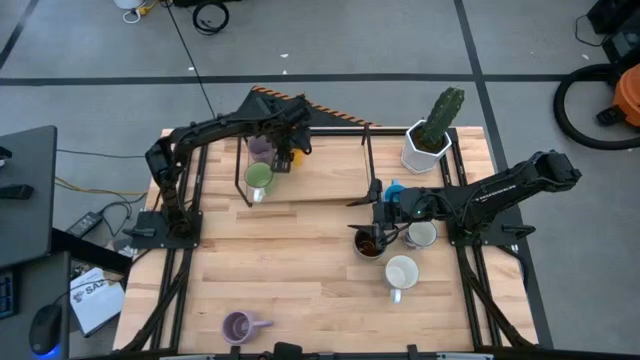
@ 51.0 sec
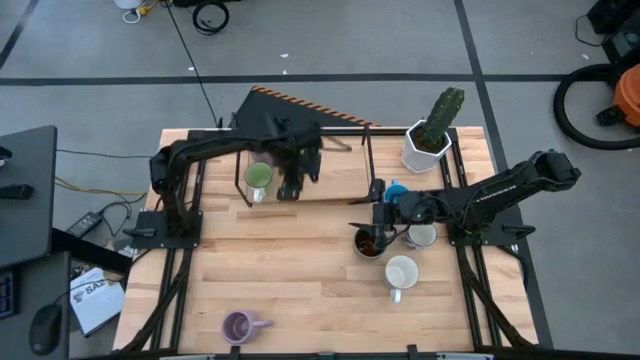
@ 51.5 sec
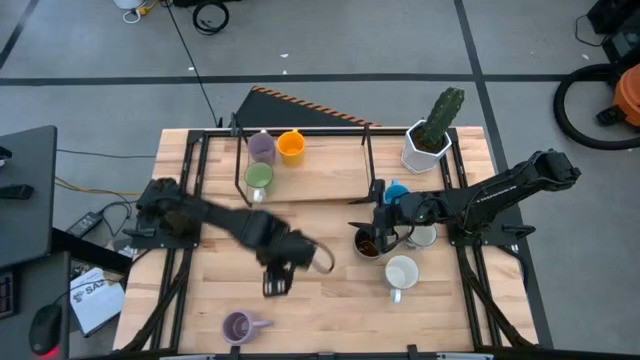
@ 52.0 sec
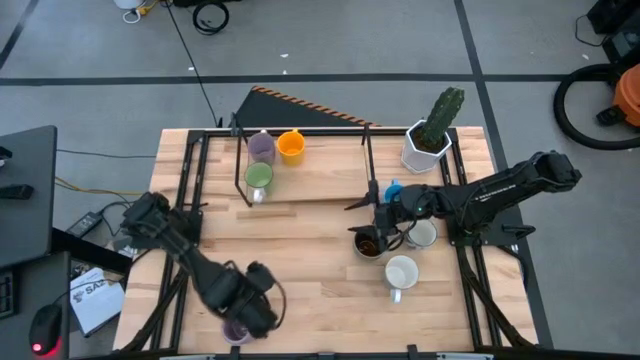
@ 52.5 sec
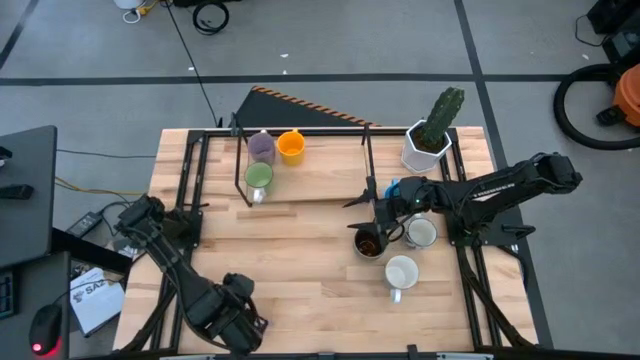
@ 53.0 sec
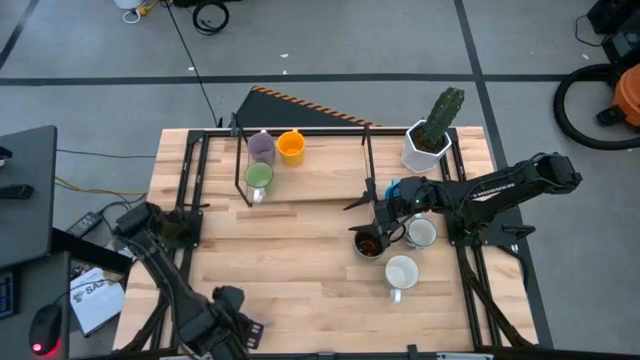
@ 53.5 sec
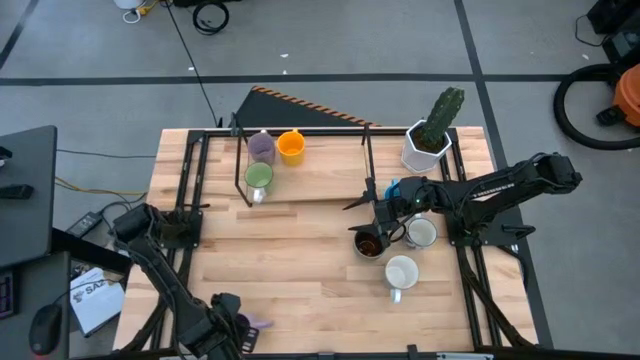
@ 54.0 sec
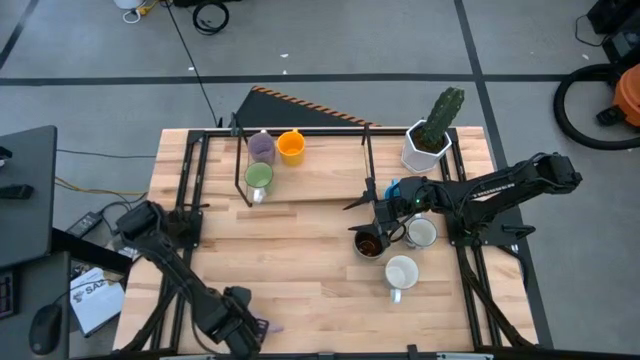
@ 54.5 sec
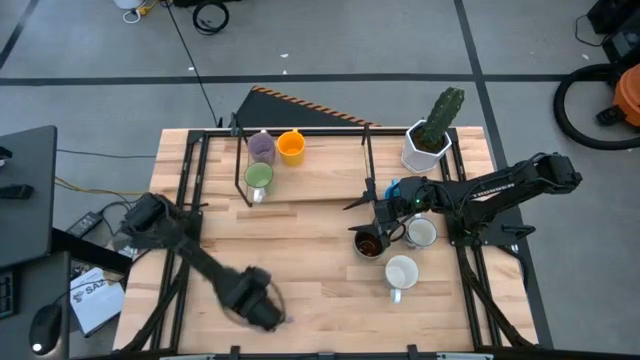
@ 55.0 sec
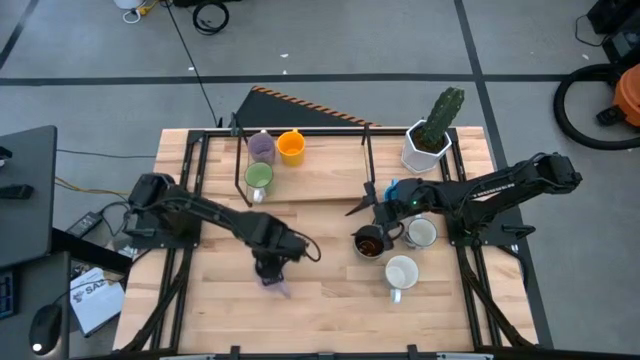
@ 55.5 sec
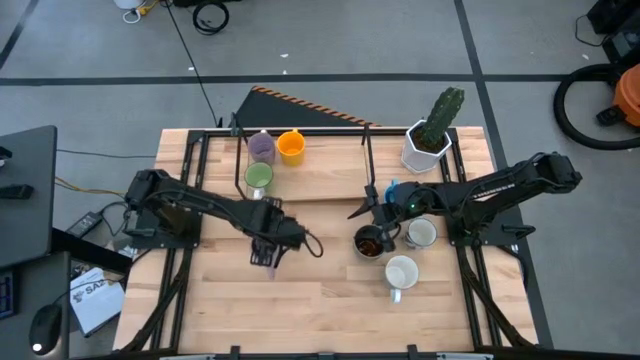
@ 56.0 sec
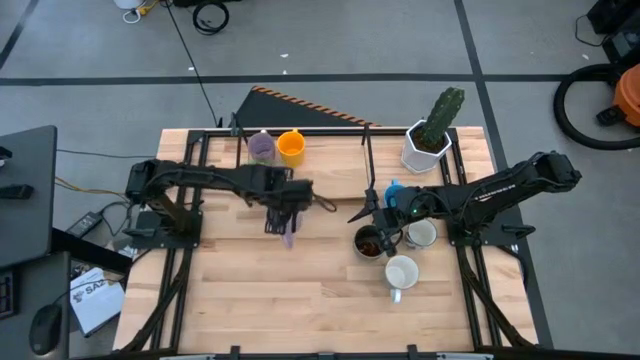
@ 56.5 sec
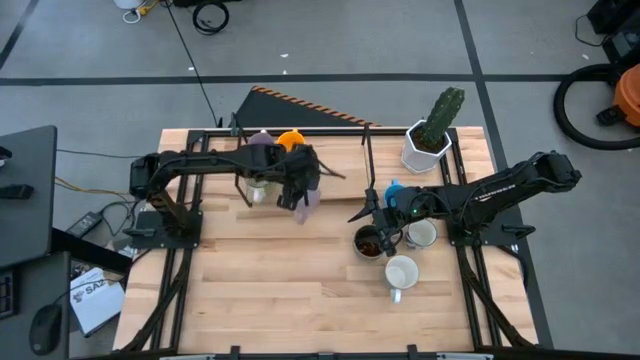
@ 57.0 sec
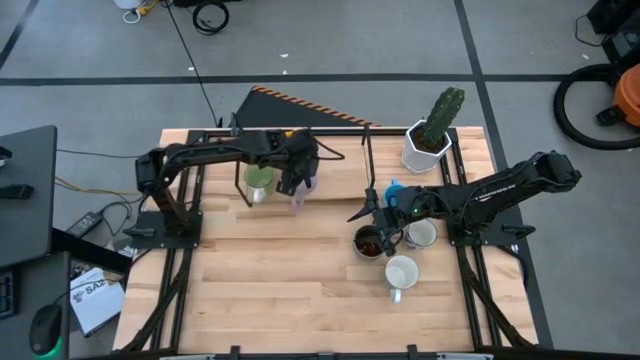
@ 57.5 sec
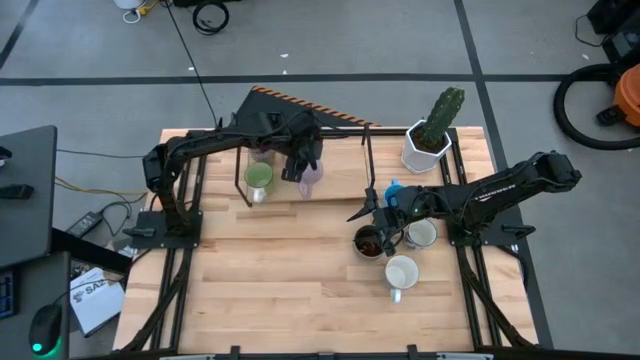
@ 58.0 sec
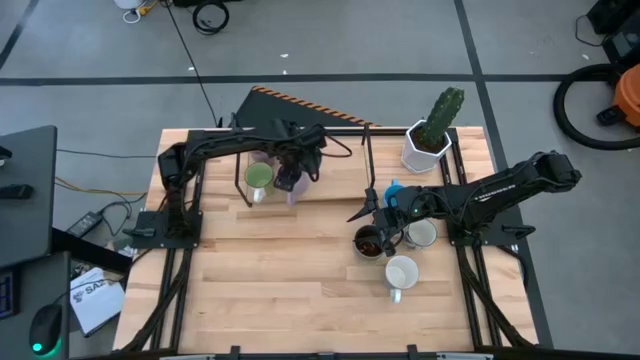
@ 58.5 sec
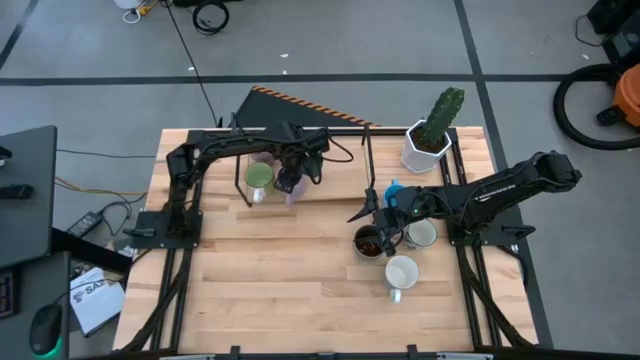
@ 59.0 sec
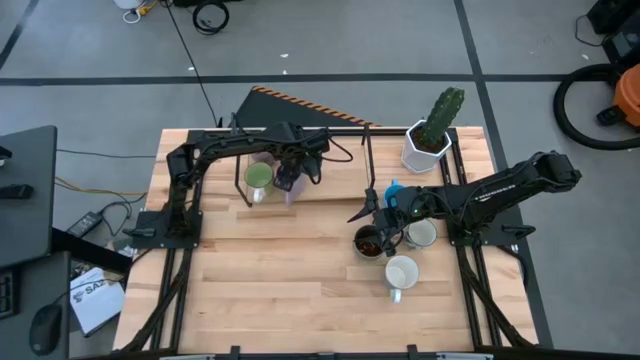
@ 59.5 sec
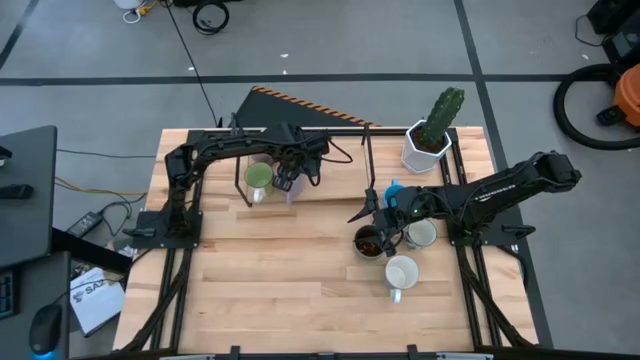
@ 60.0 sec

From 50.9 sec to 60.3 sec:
Task: Place coffee mugs
Put the purple mug on the shelf

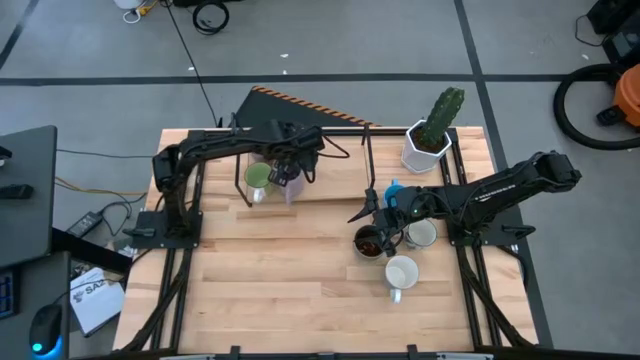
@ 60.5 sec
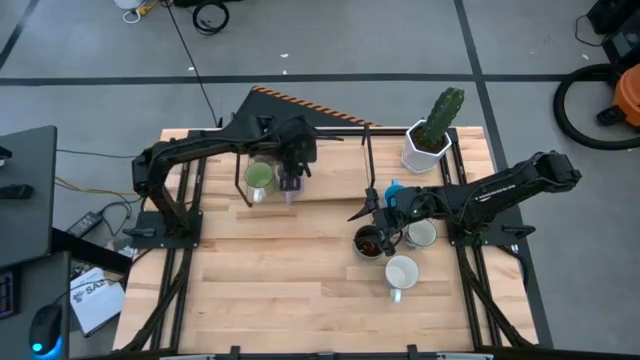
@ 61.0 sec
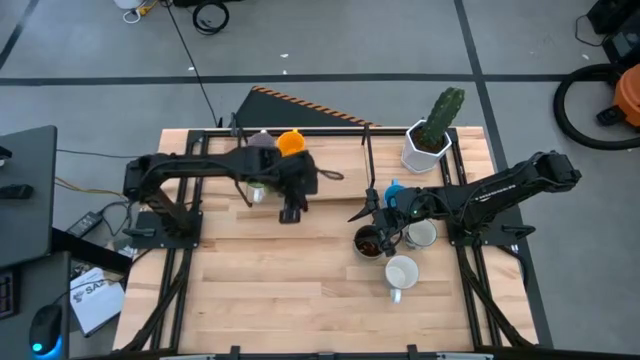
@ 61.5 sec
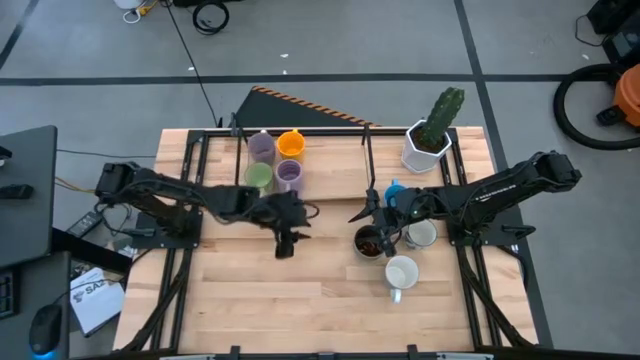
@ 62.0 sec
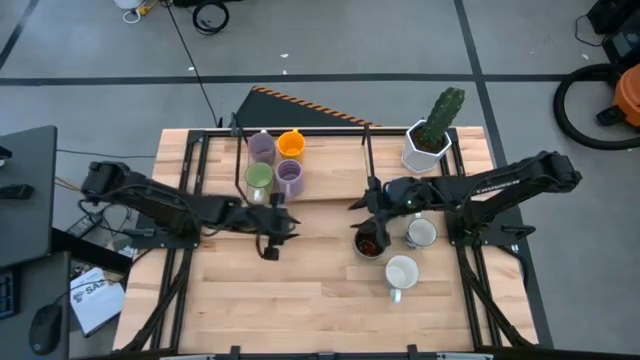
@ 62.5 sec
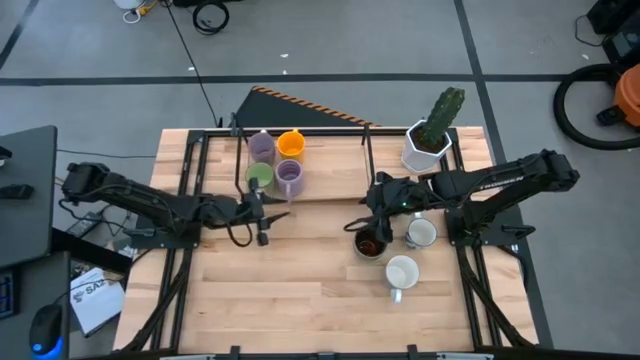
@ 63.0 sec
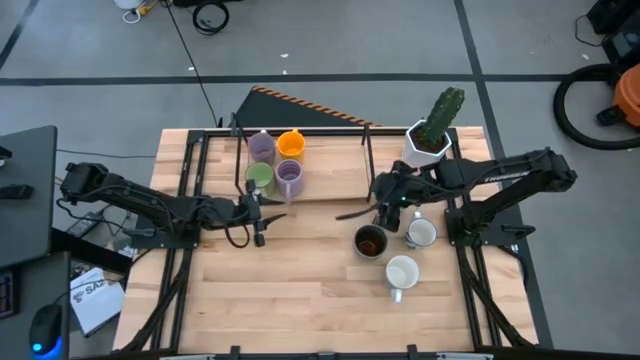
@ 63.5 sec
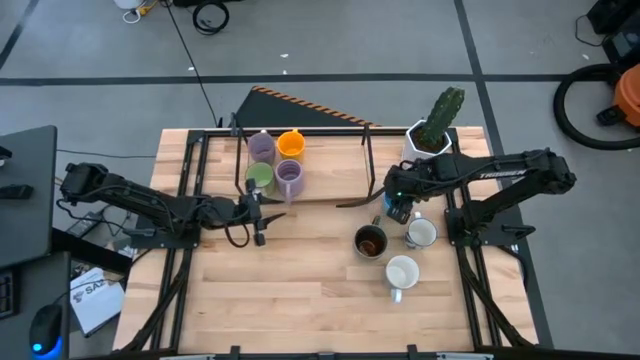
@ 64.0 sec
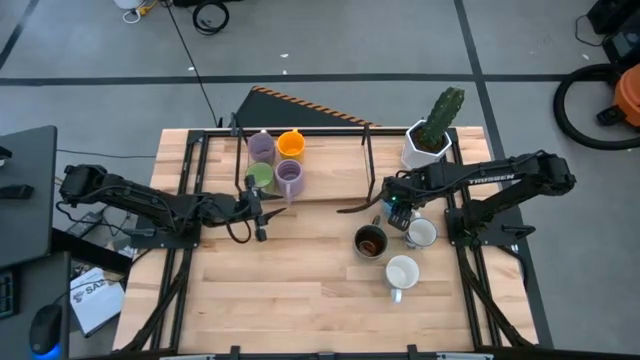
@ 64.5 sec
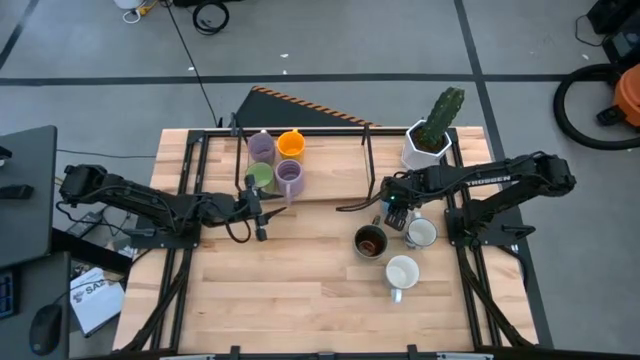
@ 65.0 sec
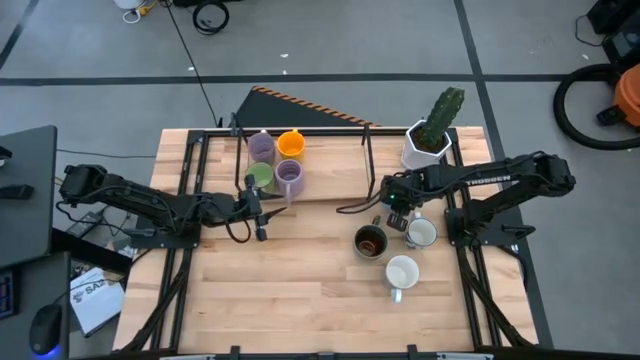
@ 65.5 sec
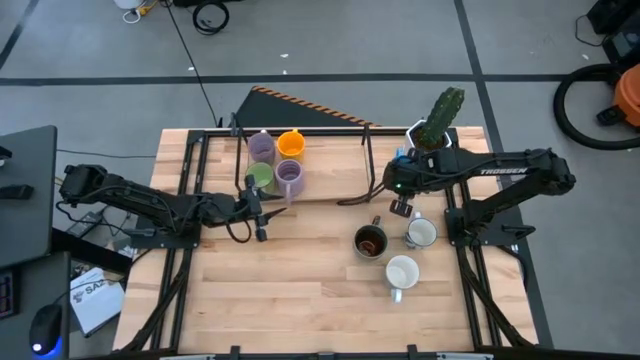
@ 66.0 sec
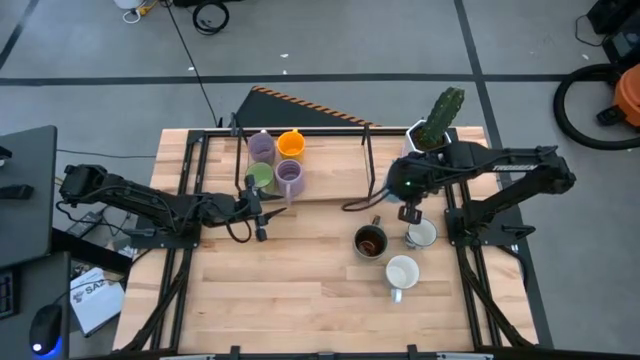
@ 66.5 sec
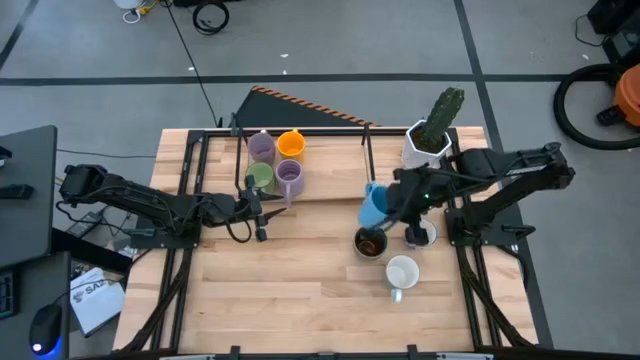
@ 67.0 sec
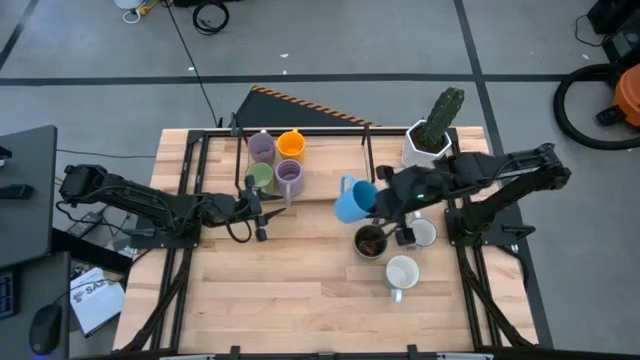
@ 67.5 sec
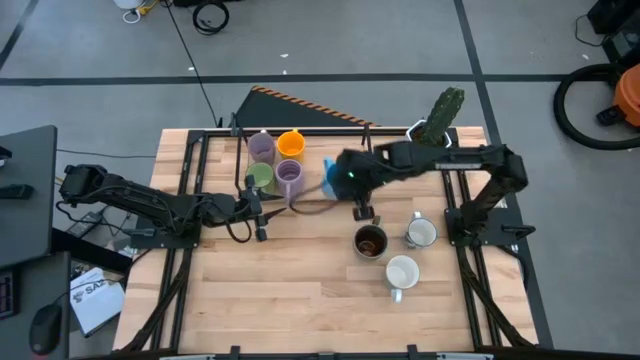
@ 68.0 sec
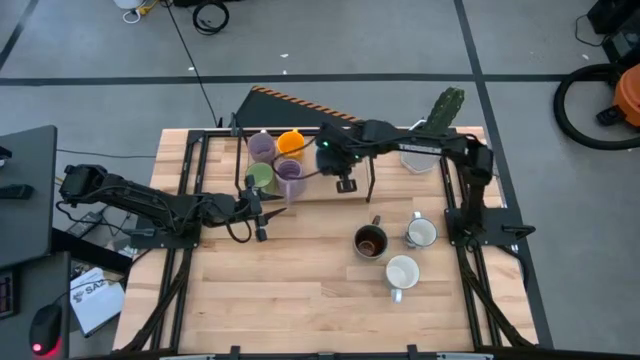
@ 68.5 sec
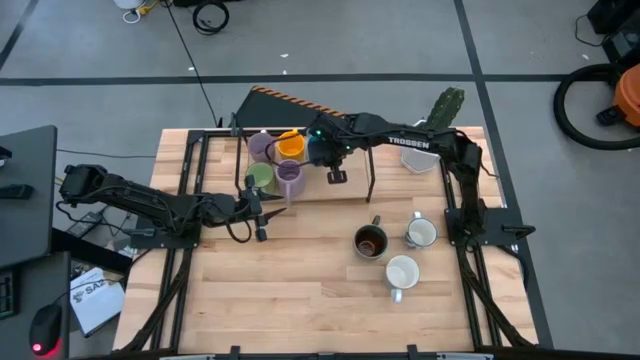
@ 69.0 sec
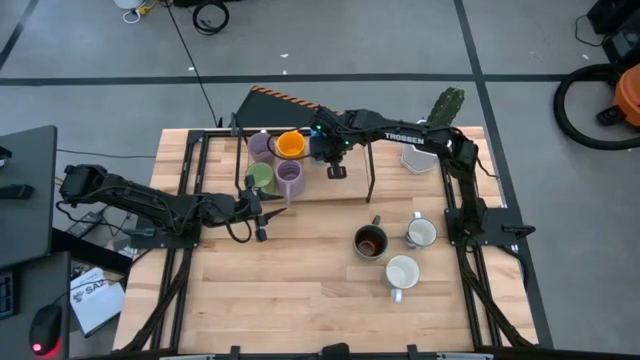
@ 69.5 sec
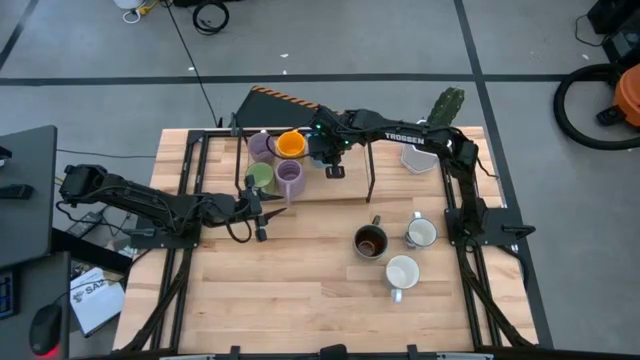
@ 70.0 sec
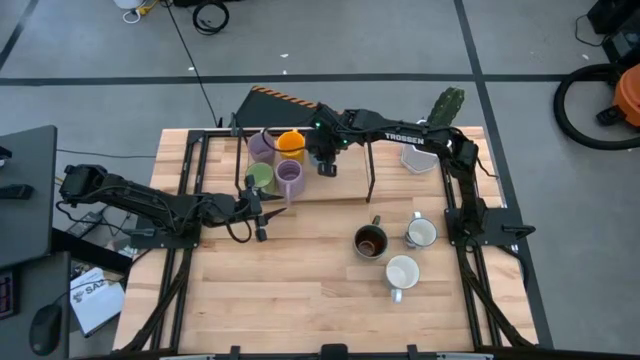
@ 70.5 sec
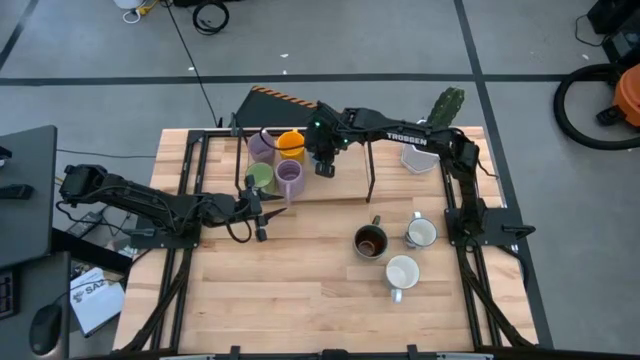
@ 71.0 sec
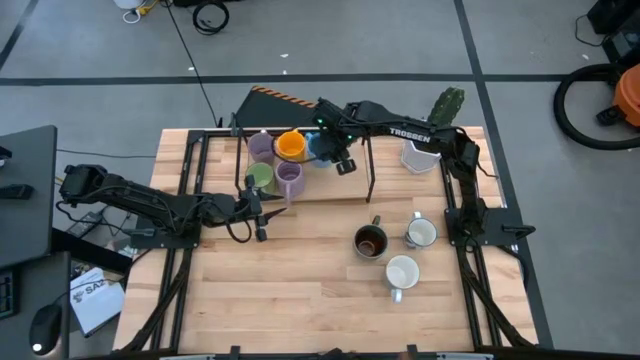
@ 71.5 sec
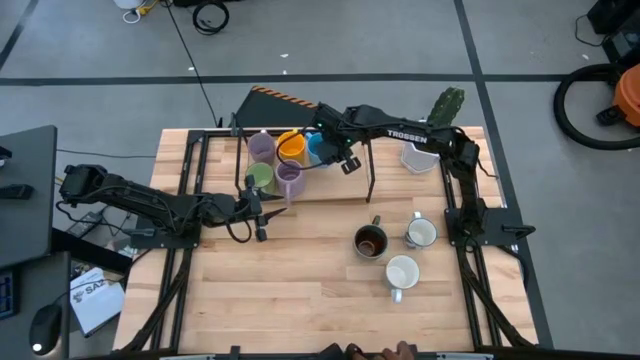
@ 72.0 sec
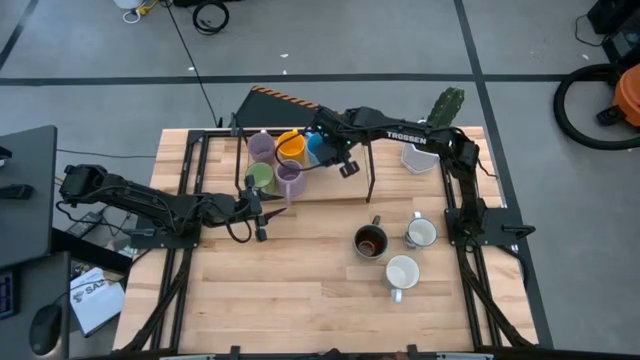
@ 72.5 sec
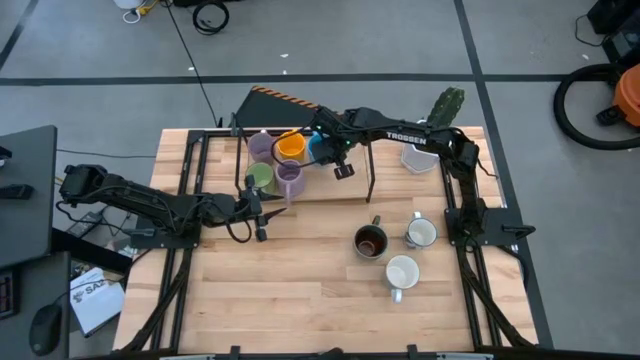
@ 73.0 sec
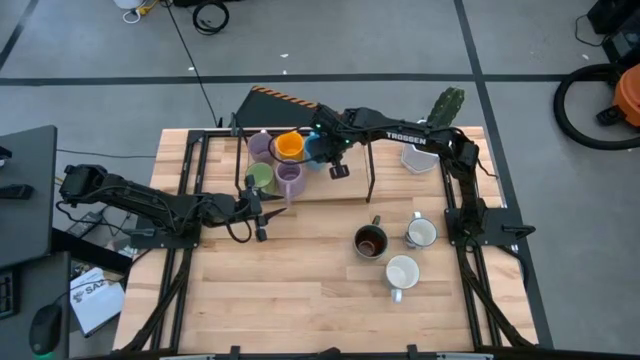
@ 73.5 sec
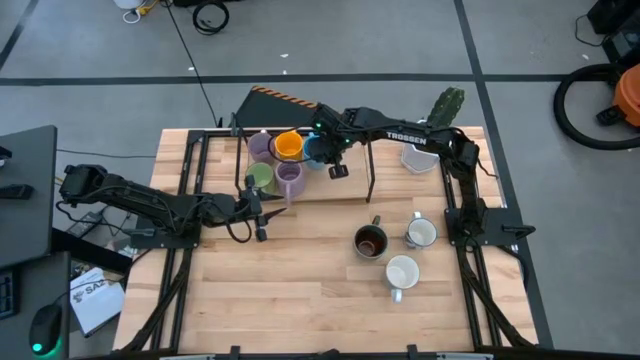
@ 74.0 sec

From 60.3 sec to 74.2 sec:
Put the top light blue mug on the shelf
